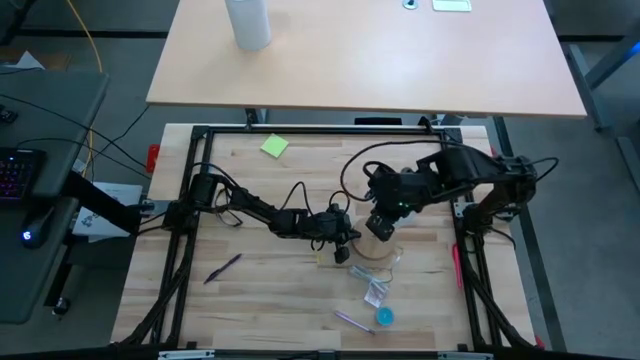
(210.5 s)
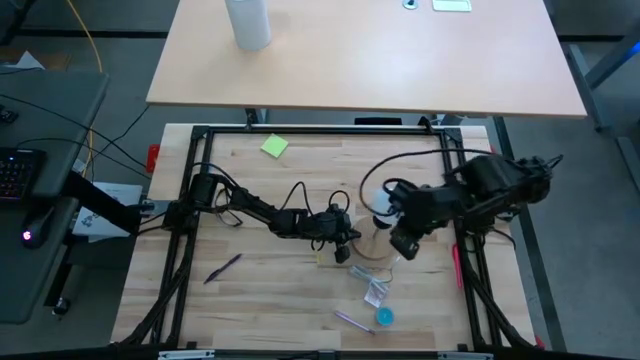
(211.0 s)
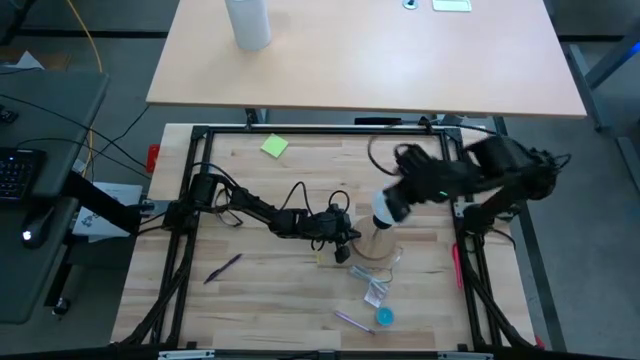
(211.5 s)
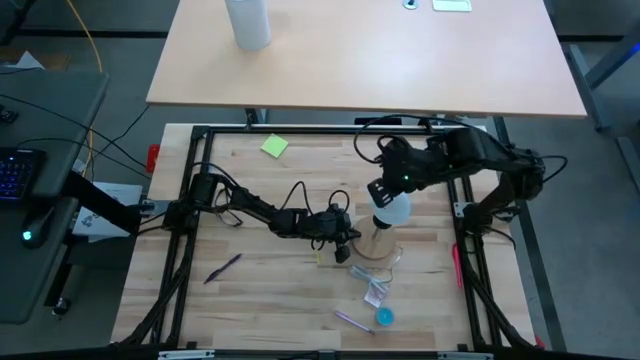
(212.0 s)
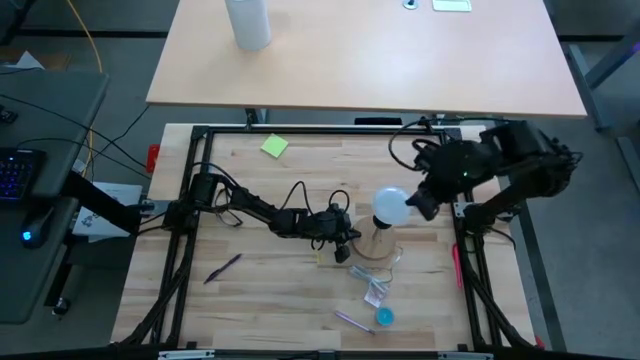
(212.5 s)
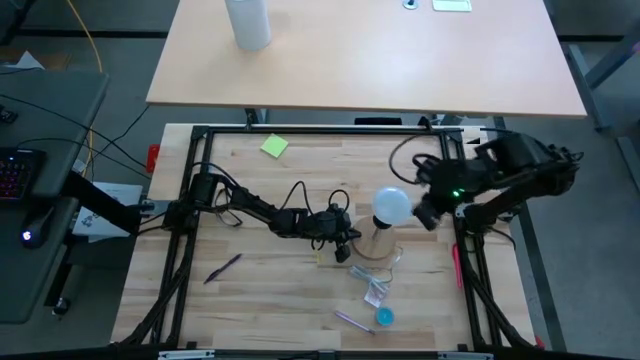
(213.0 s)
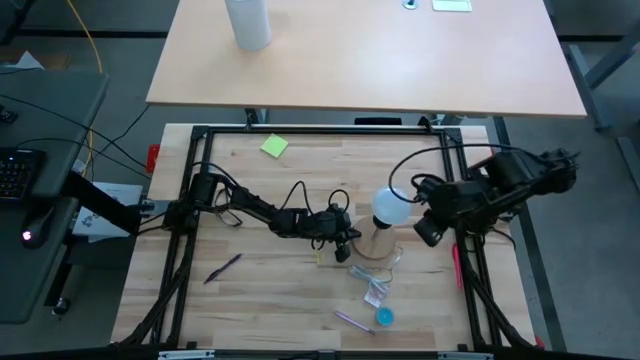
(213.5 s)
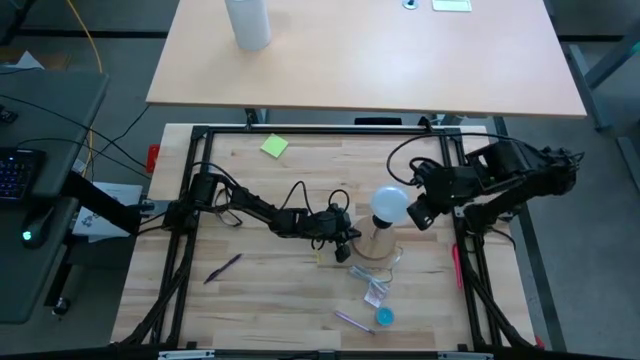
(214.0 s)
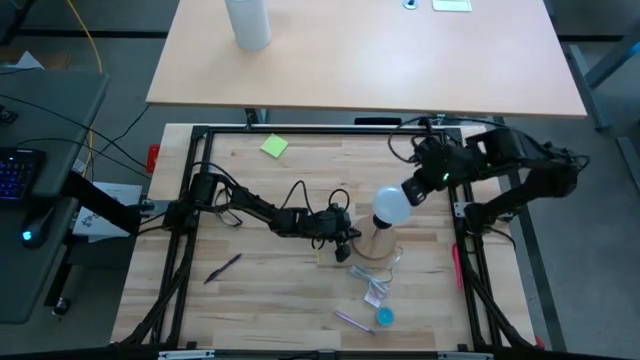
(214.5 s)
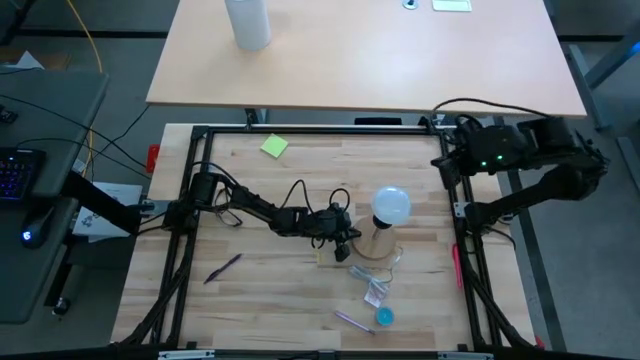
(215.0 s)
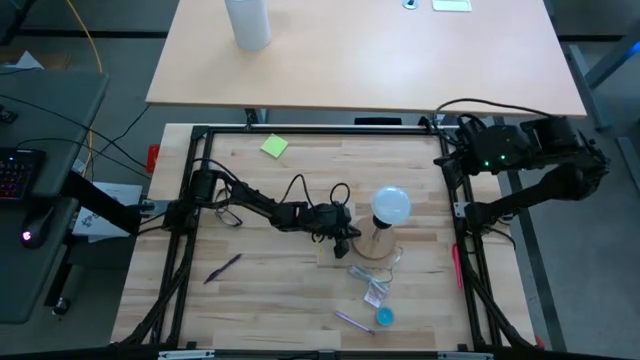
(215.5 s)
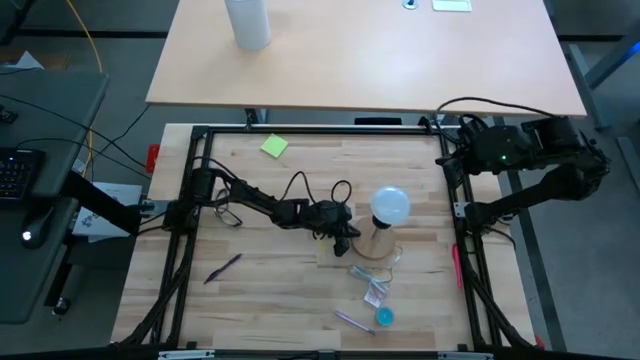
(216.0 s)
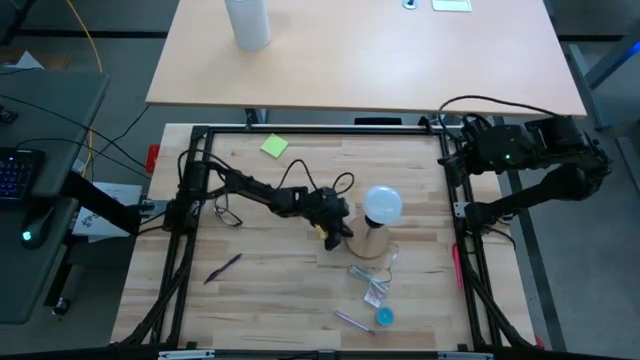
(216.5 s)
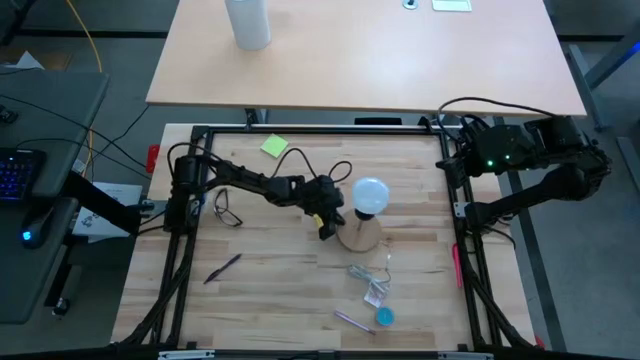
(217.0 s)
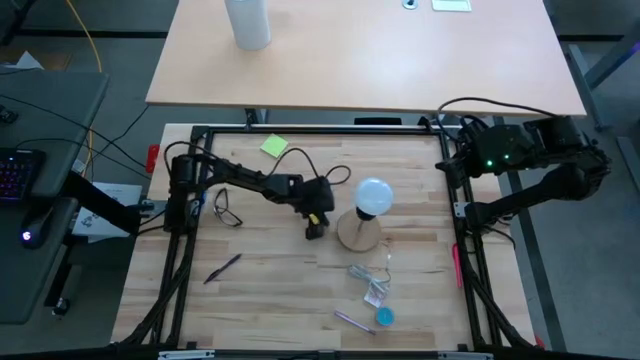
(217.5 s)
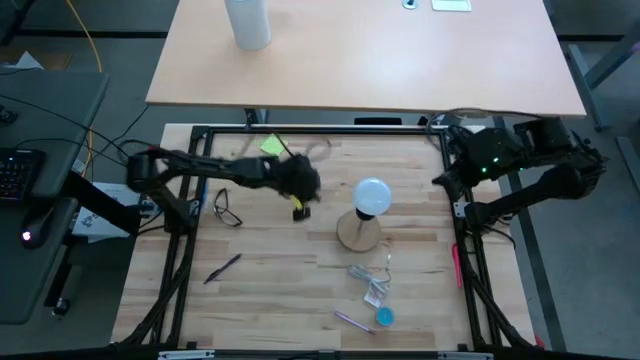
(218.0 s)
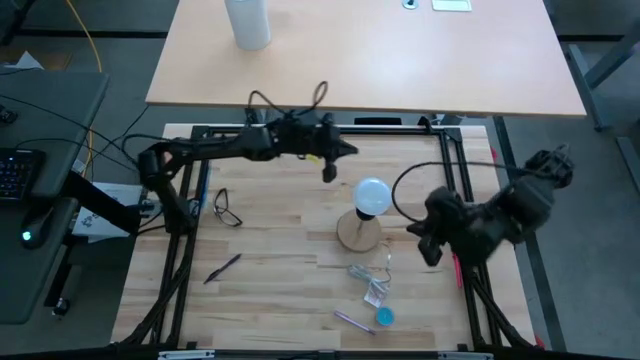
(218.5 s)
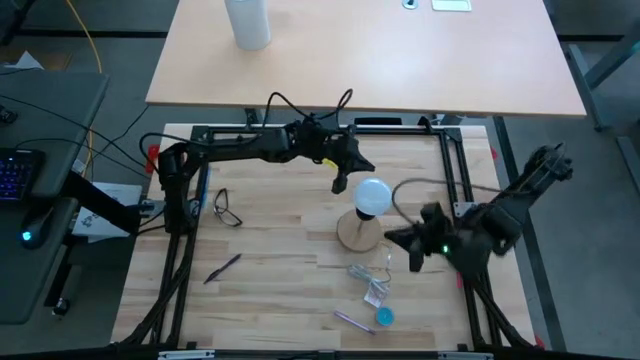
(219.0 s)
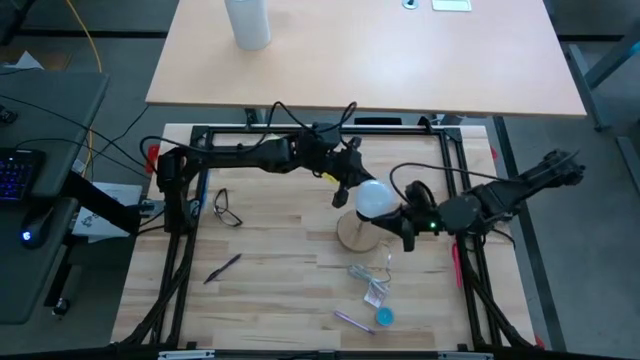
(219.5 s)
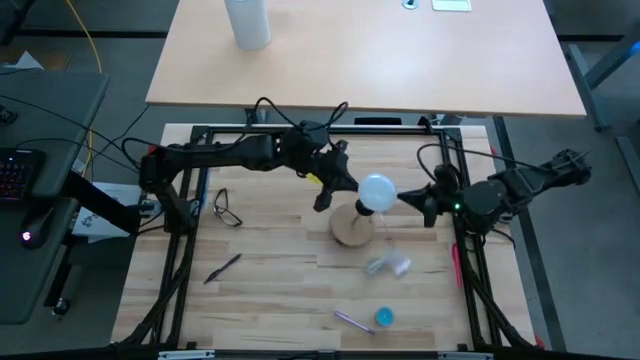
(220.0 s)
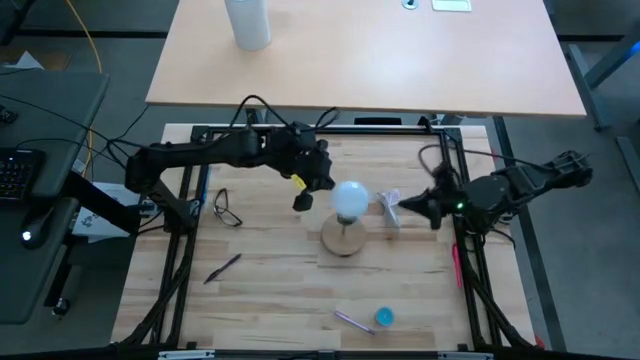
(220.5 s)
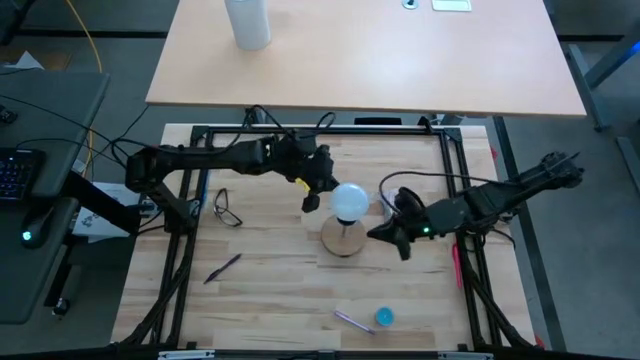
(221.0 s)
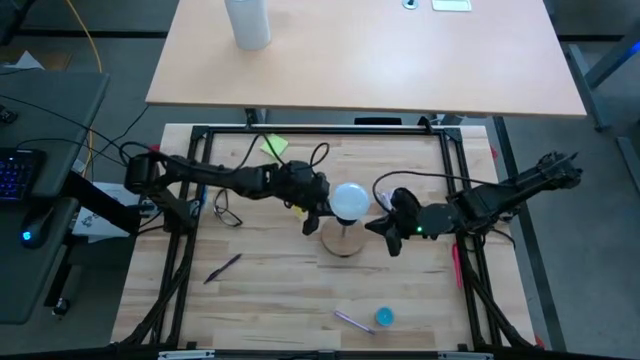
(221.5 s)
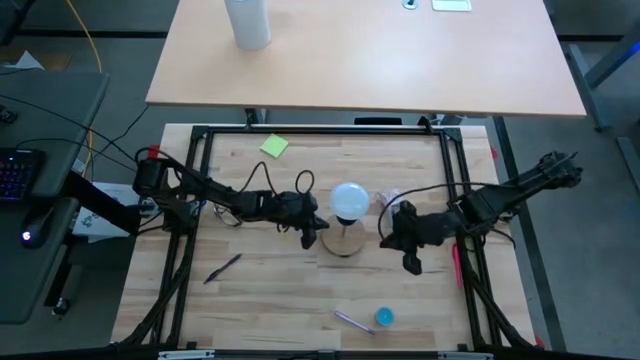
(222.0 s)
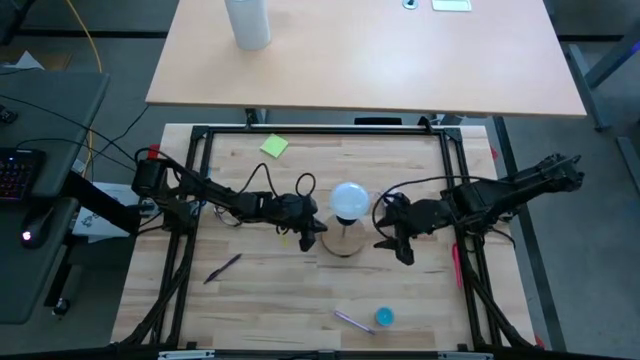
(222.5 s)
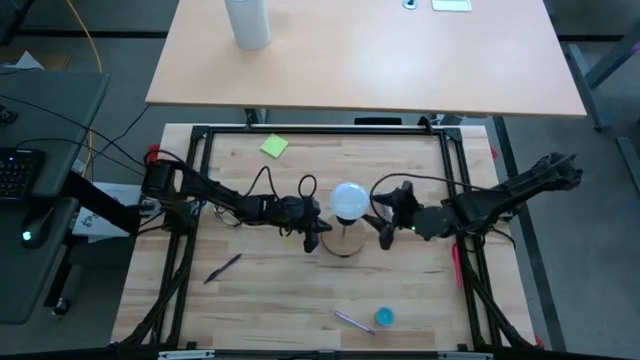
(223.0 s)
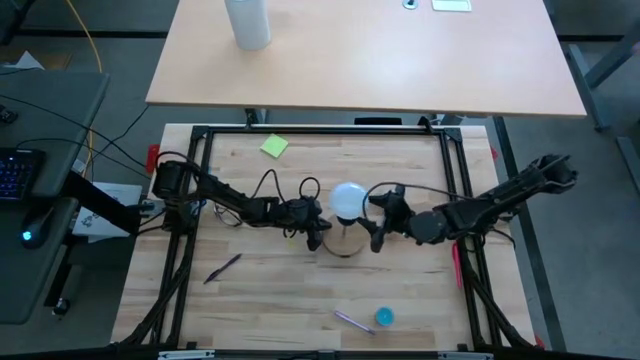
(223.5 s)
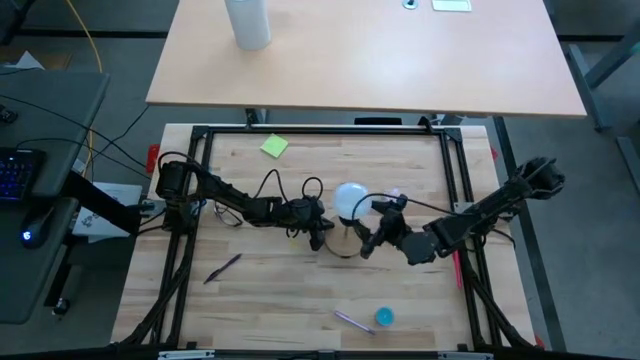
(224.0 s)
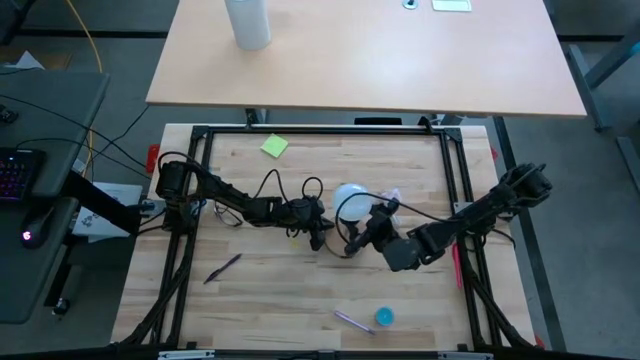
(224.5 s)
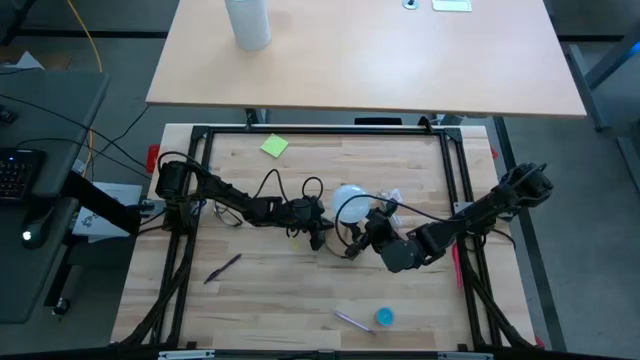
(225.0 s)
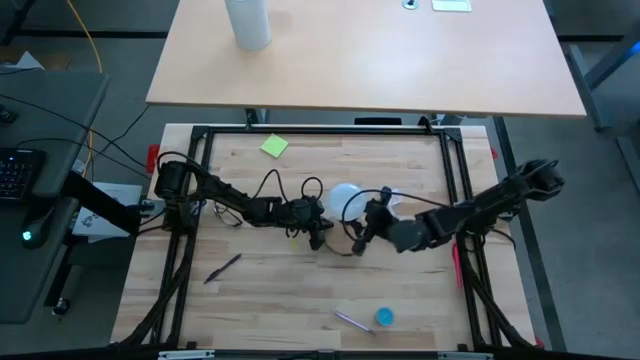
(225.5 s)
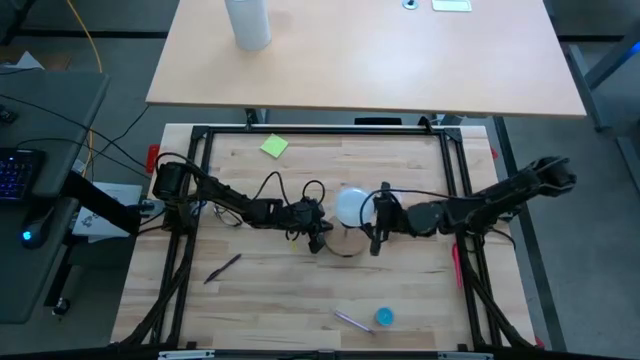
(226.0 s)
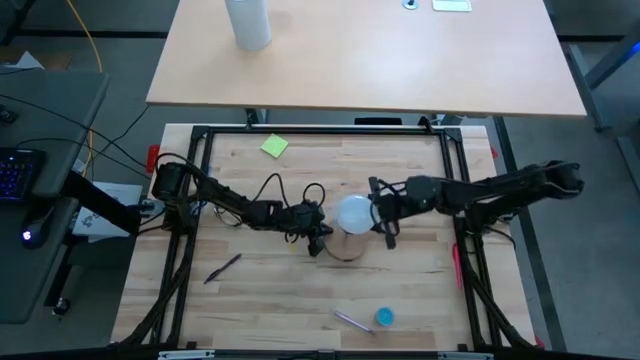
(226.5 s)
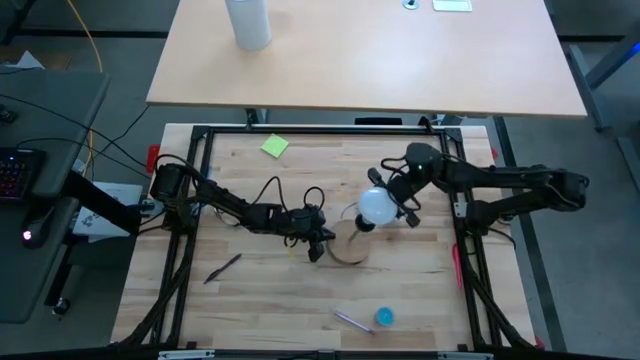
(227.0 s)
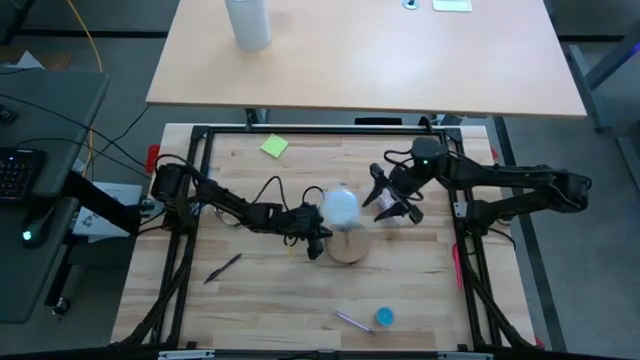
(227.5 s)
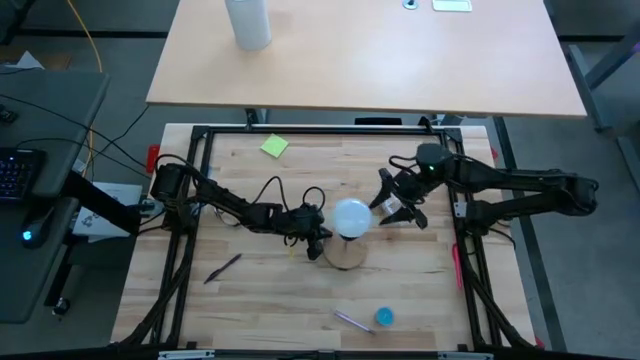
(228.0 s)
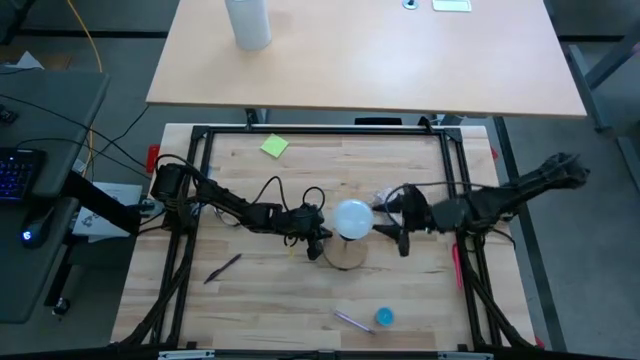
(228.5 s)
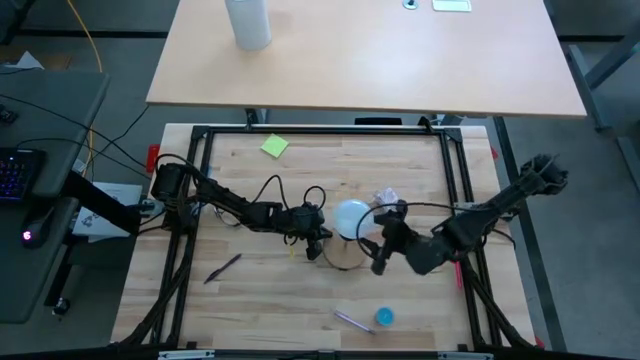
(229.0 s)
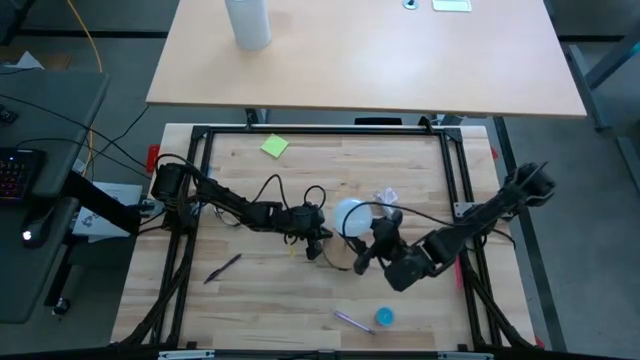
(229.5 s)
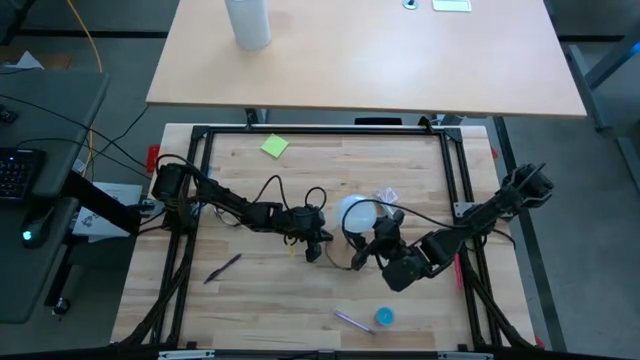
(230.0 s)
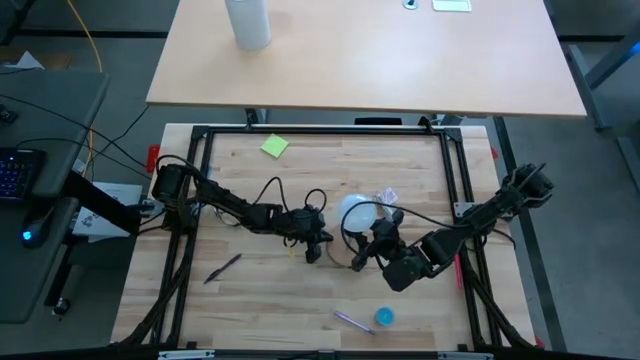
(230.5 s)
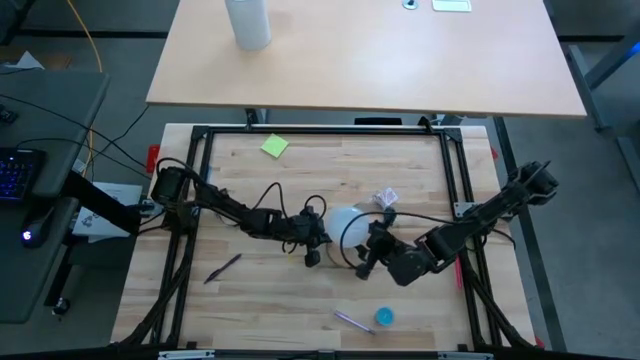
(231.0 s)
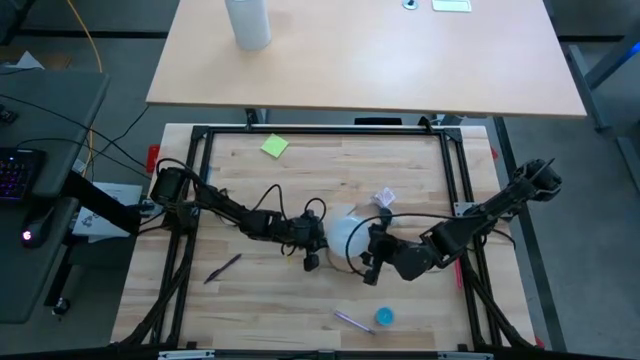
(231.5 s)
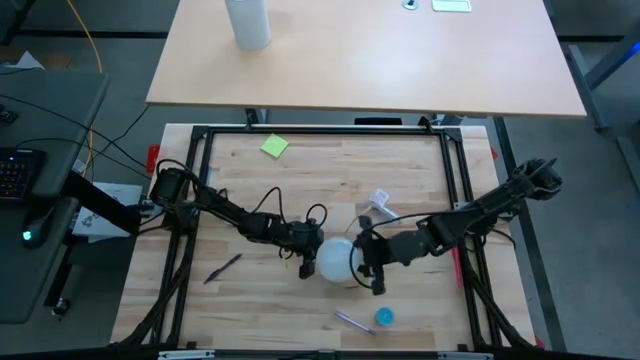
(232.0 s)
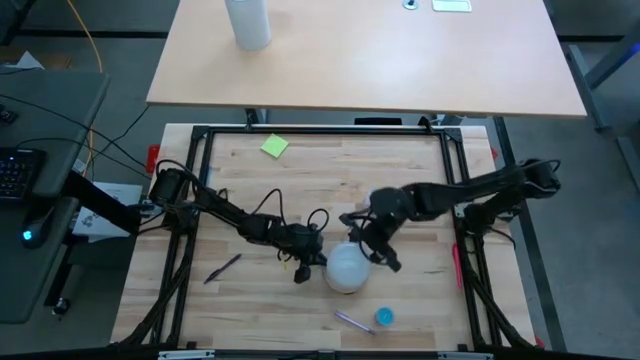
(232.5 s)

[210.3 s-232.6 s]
Task: Screw lightbulb
Remove the lightbulb from the lamp
